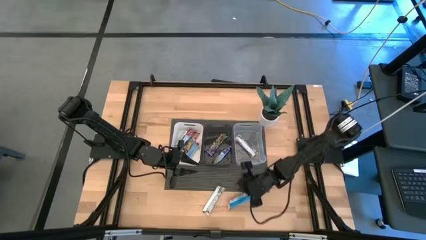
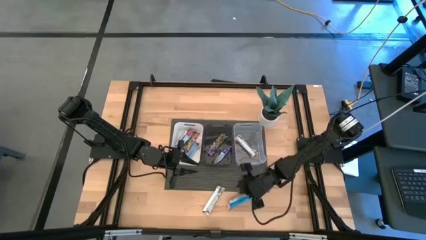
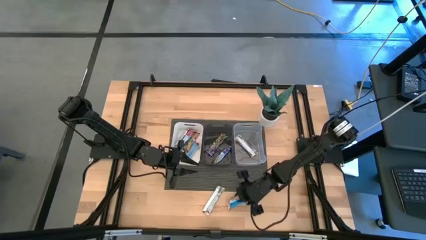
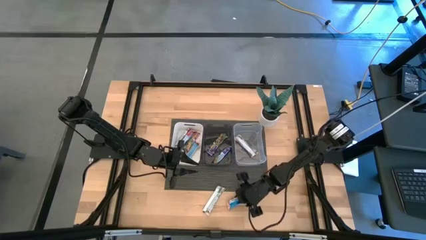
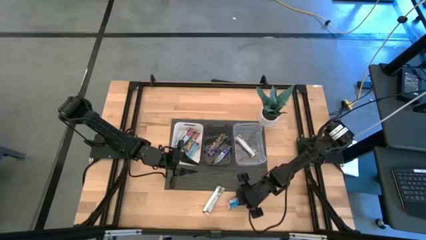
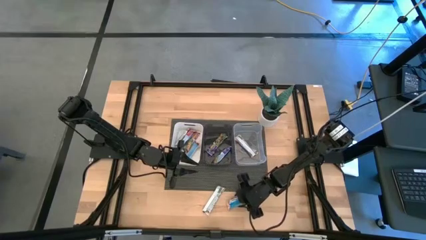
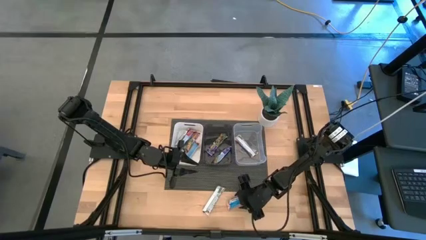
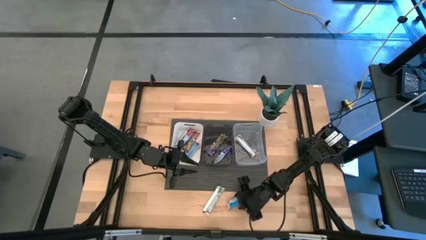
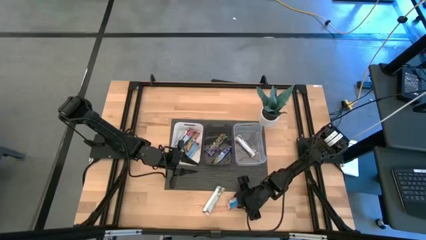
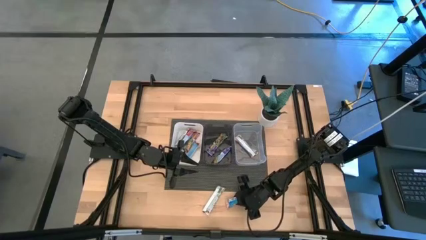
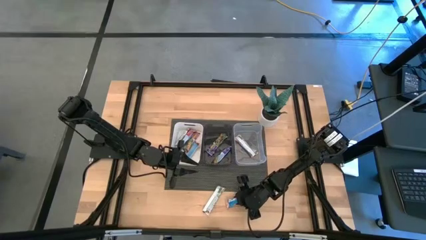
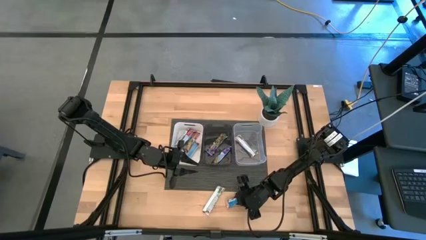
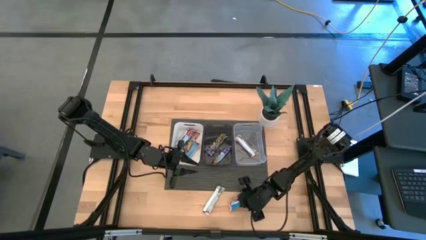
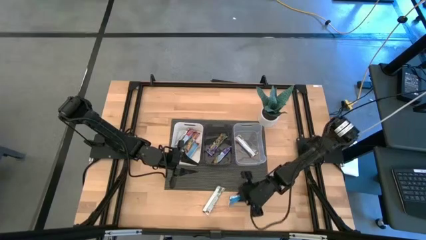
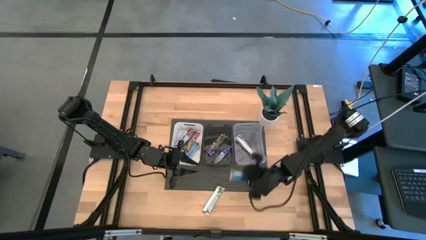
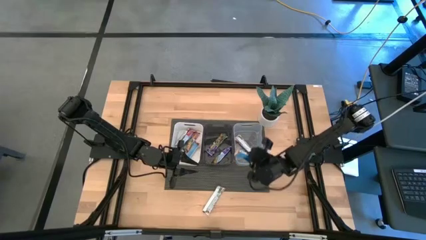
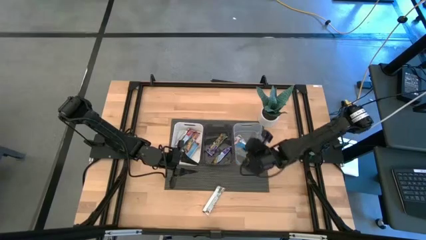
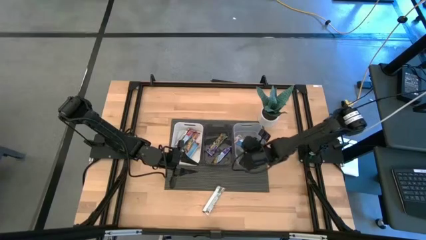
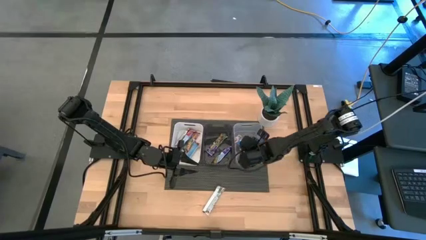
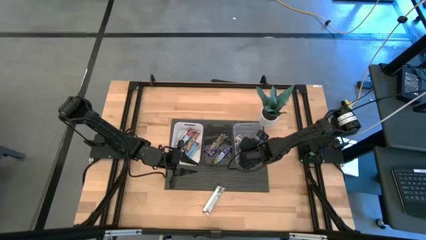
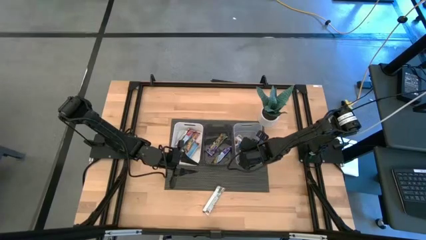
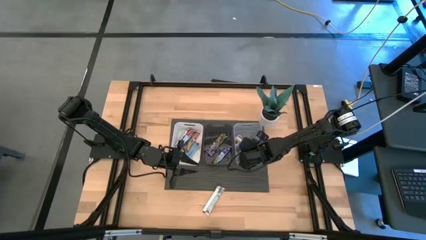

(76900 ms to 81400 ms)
Task: Pick and place Granola Bars by type
Put the yellow granola bar into the transparent bin

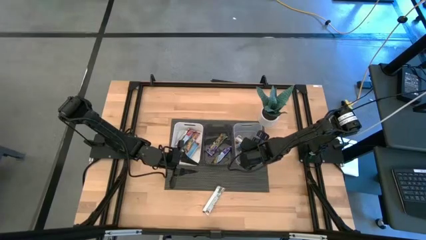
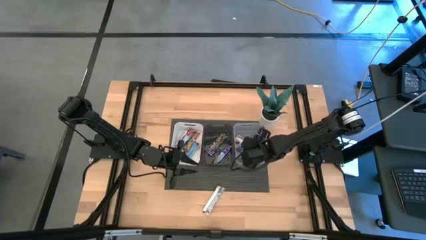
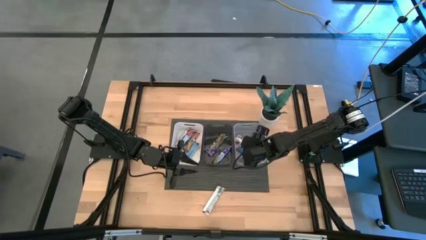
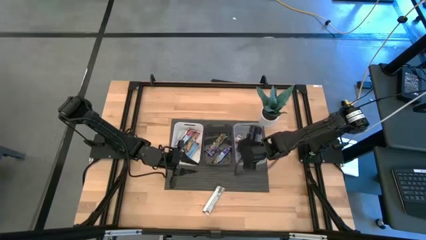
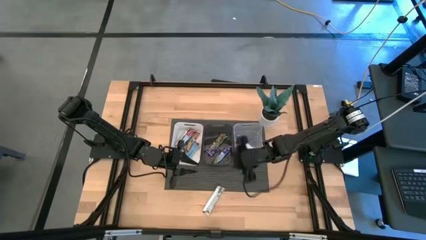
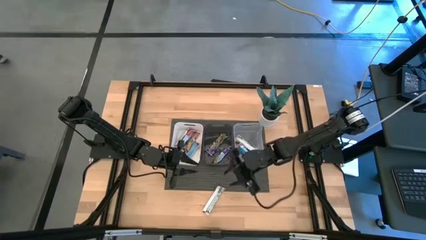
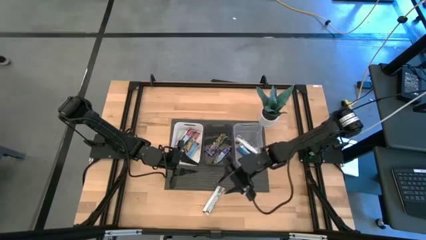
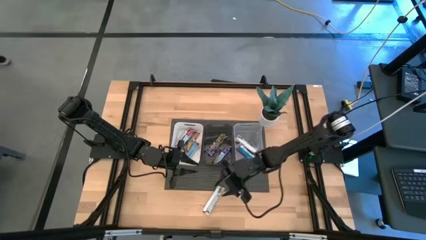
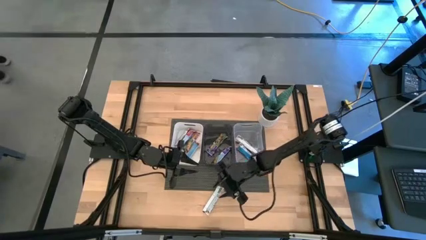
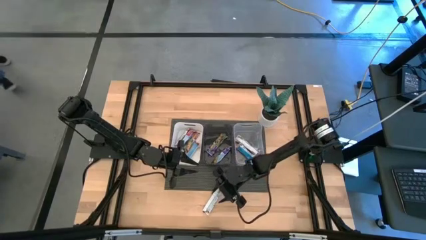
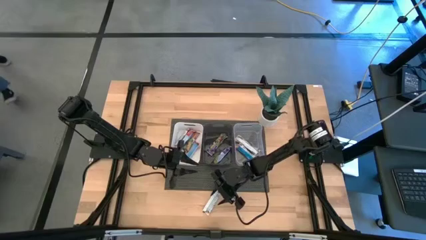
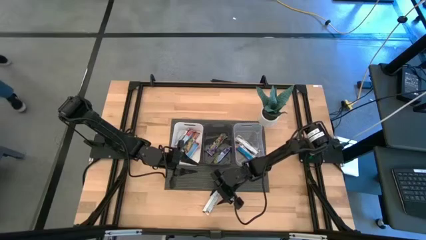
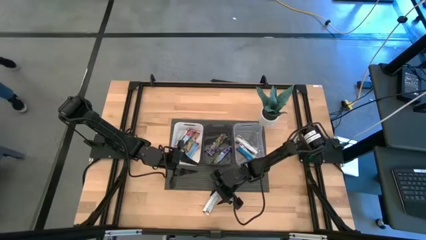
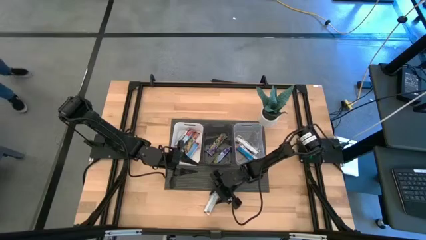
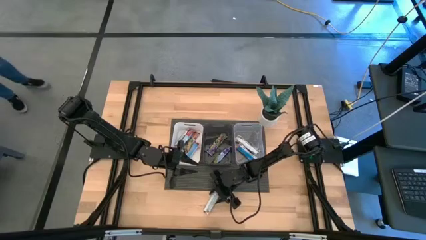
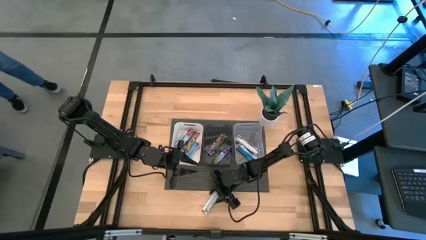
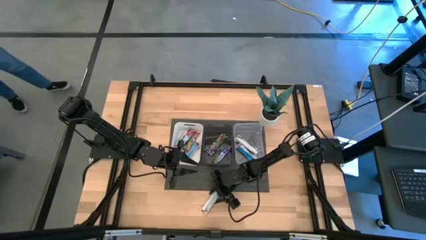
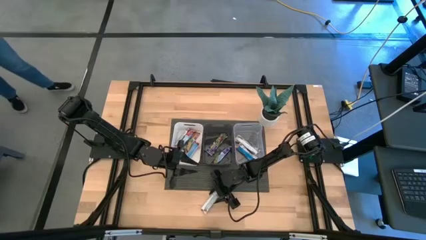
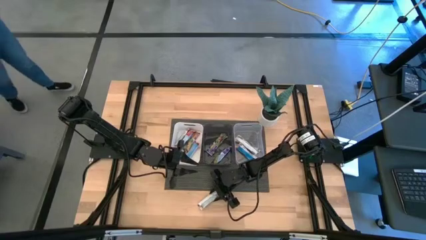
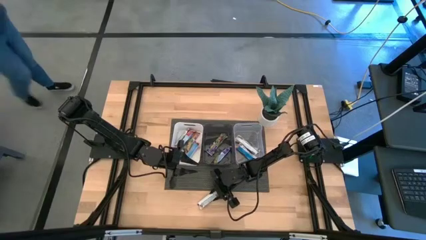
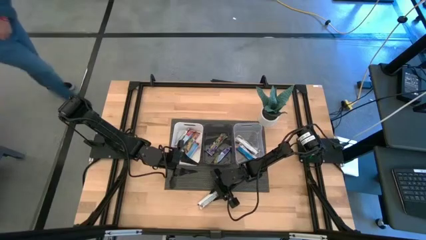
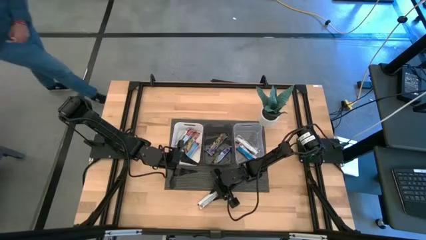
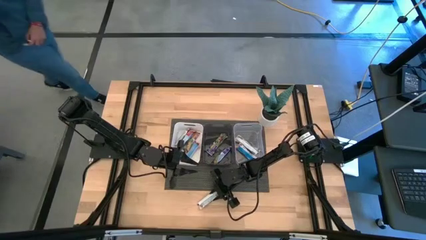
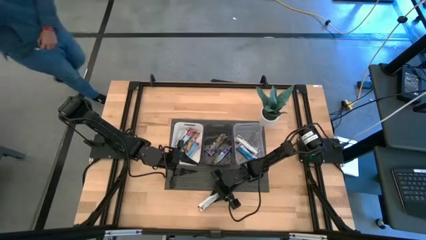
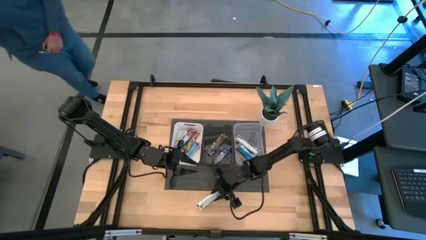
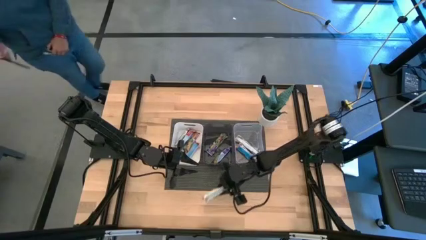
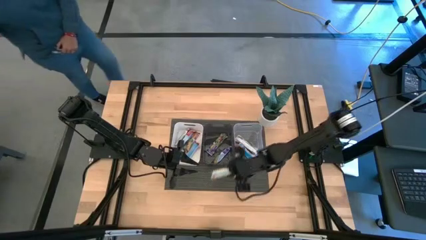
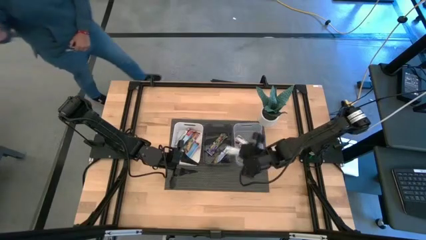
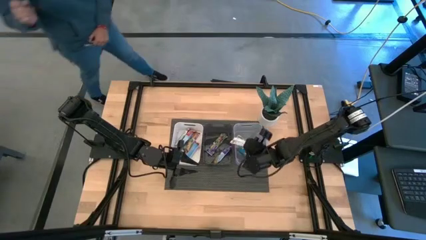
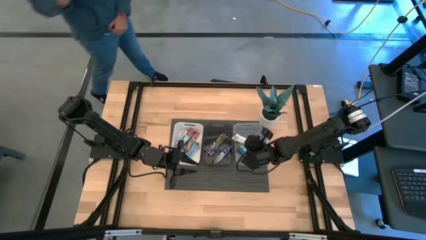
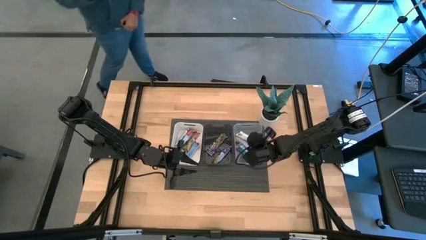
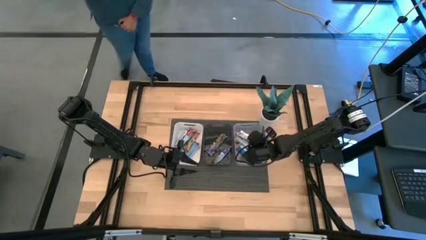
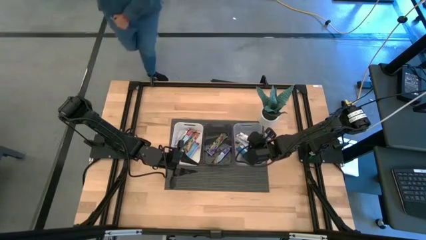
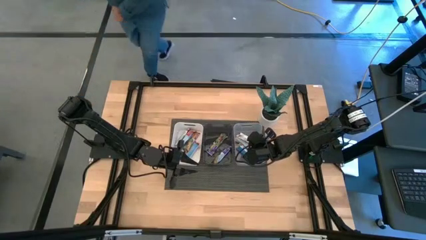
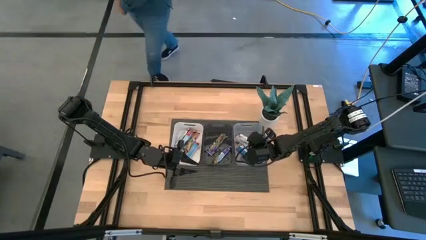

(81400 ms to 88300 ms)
Put the yellow granola bar into the transparent bin

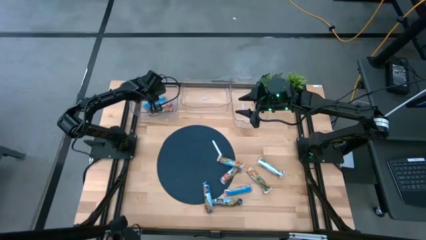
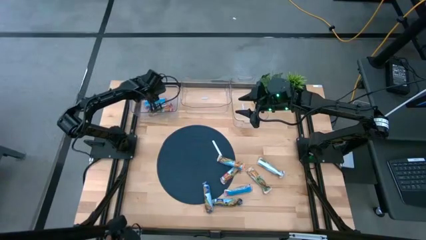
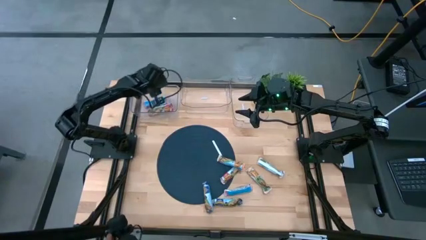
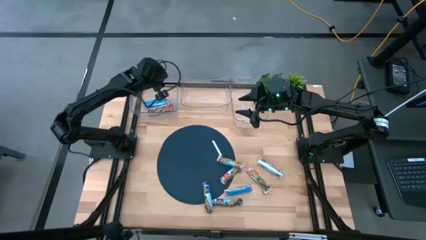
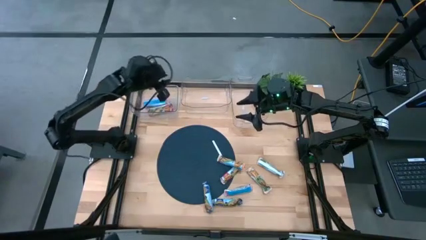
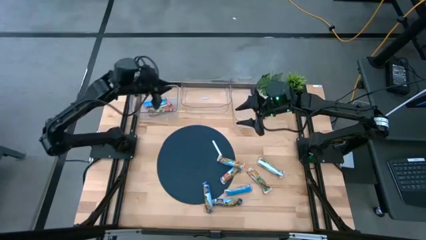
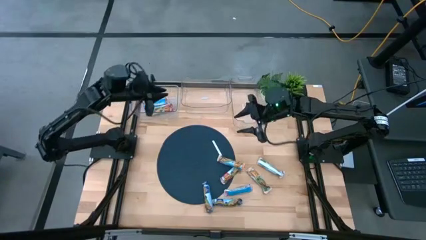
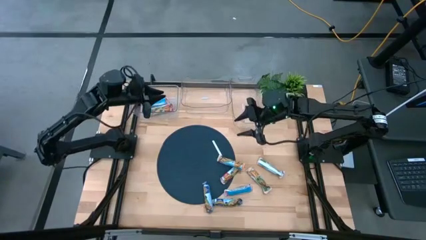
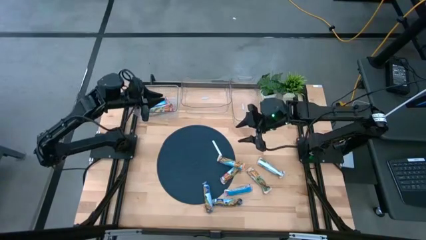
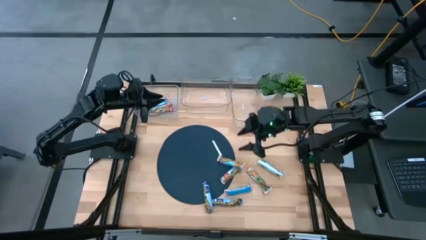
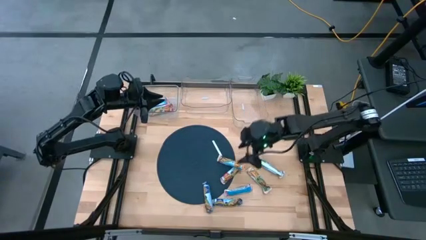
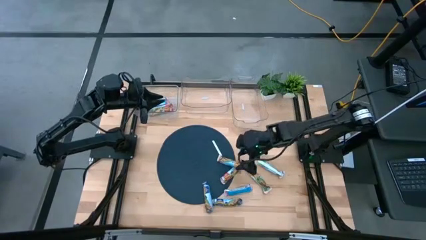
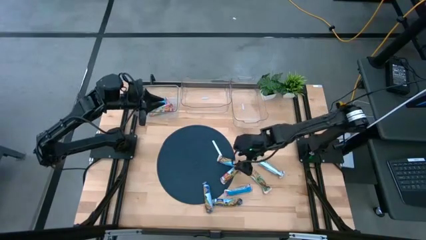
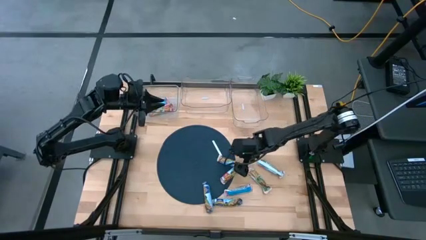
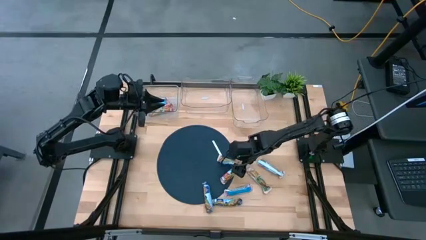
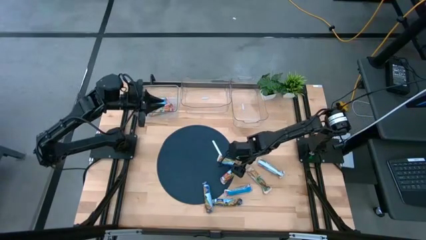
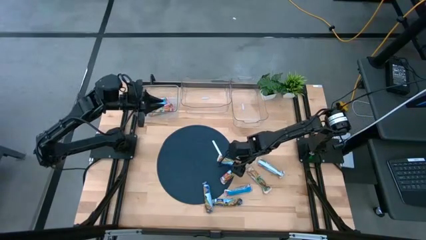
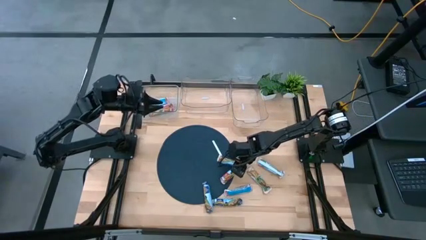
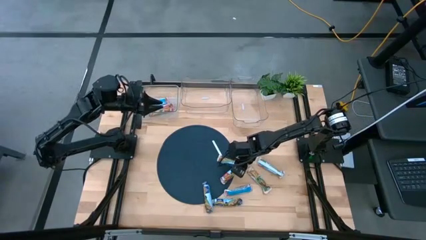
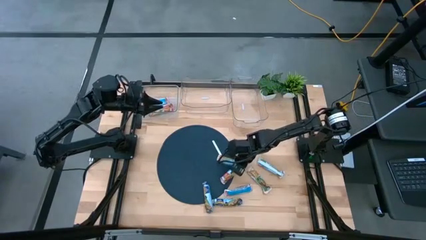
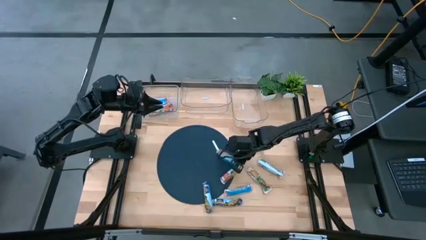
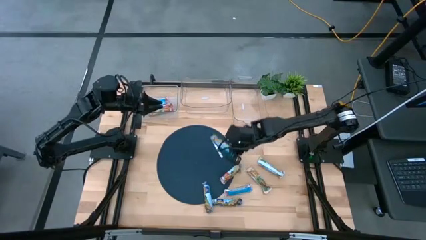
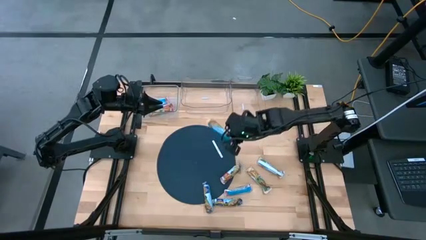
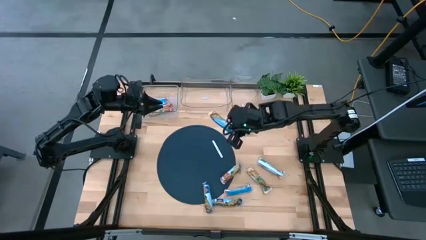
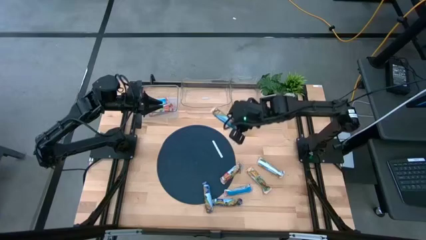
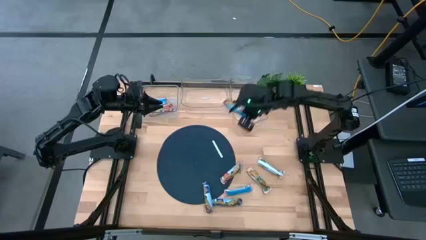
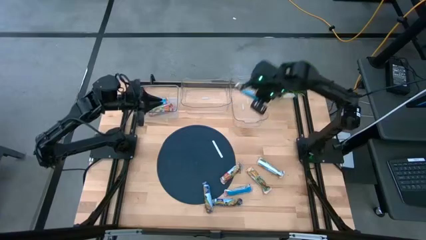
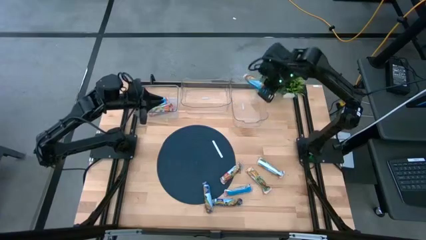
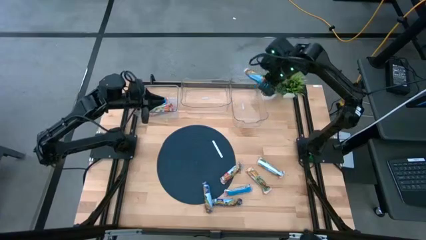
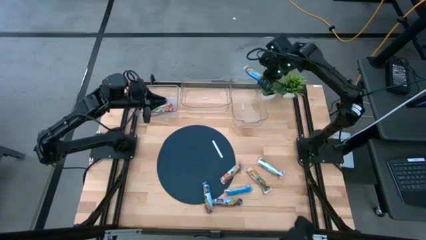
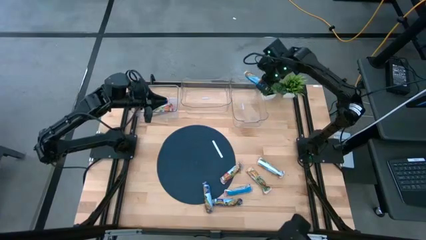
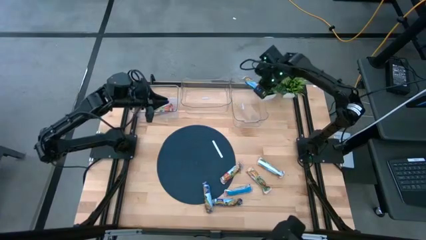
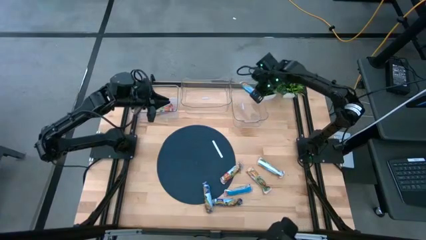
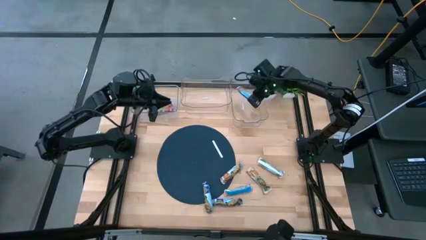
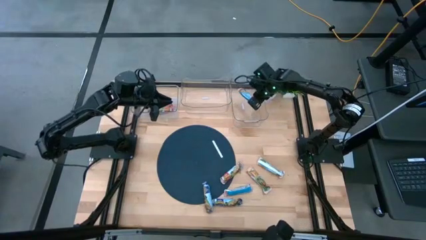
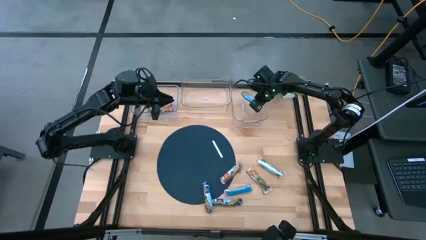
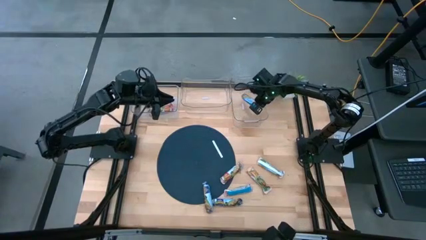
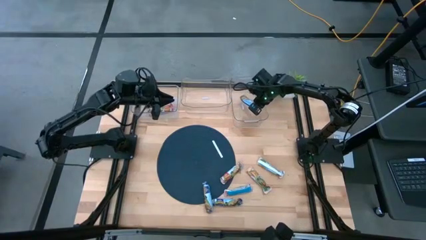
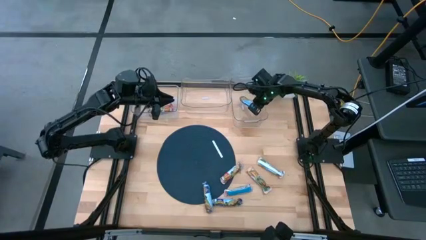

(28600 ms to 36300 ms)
Task: Pick and place Granola Bars by type
Put the yellow chewy bar into the top right transparent bin
